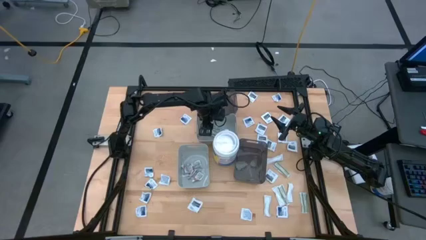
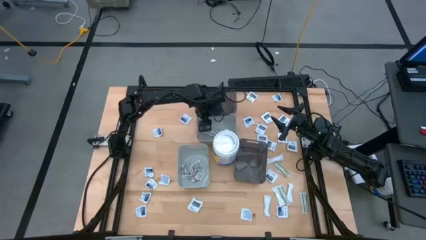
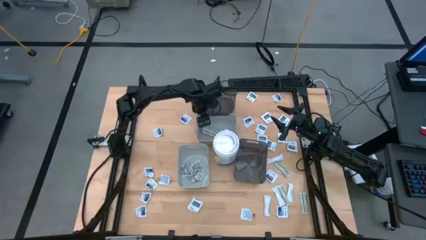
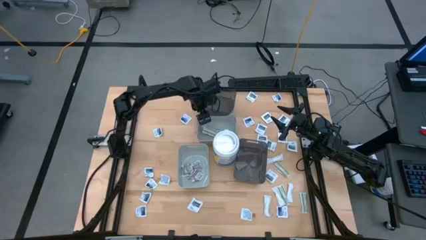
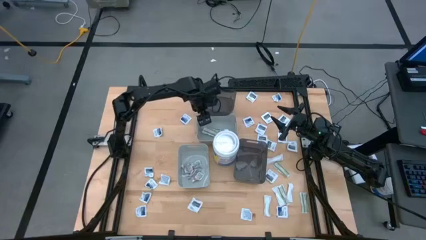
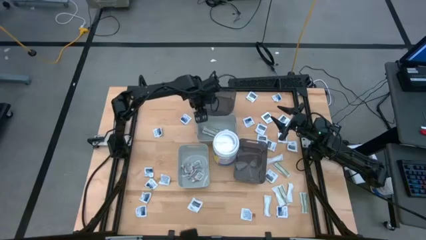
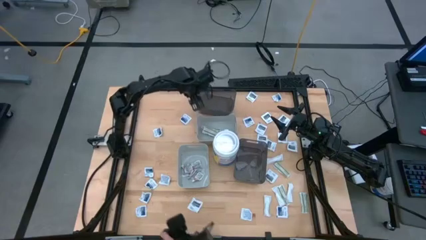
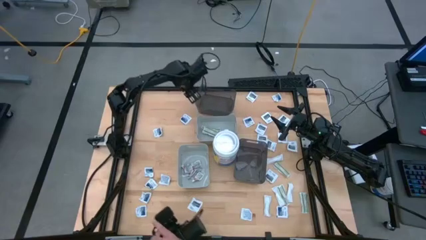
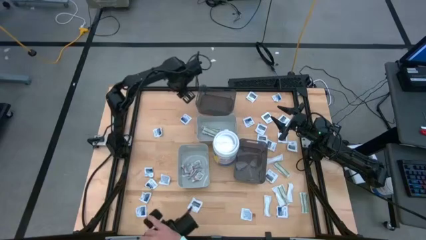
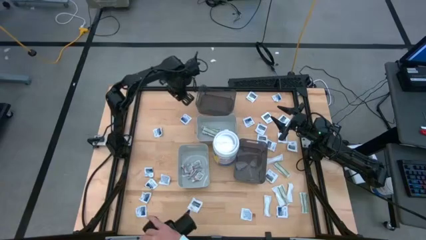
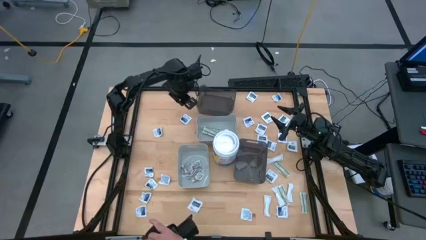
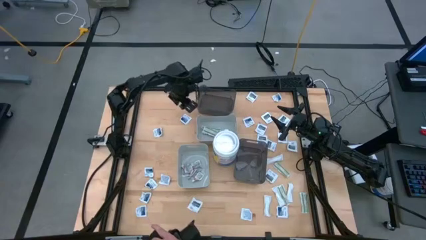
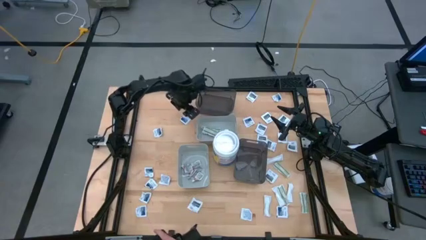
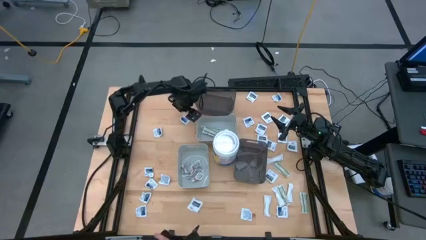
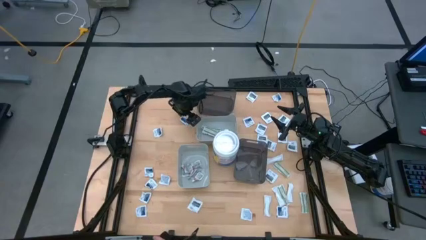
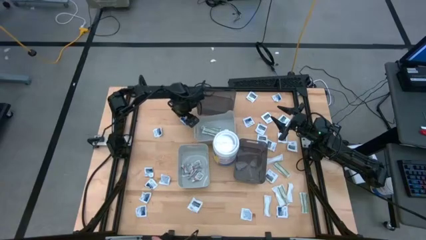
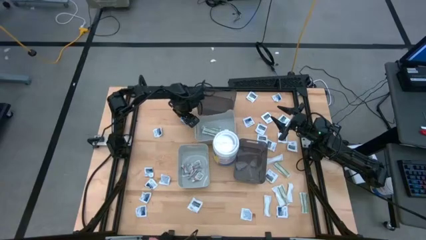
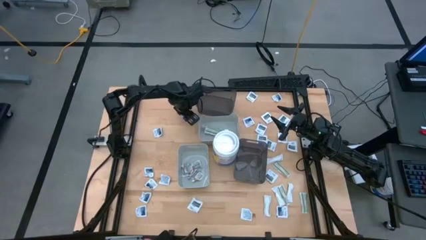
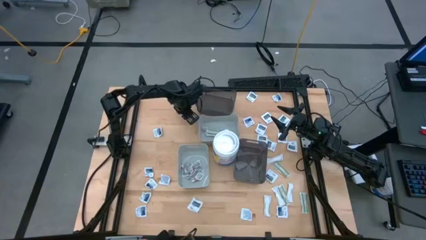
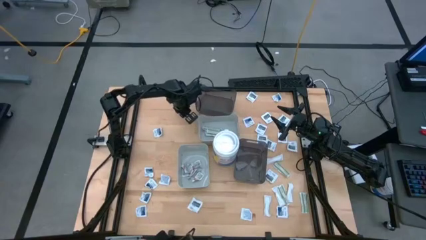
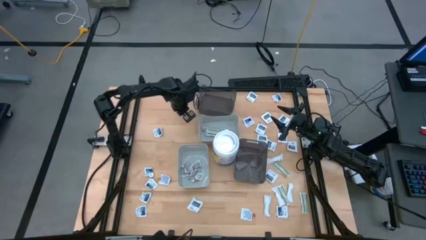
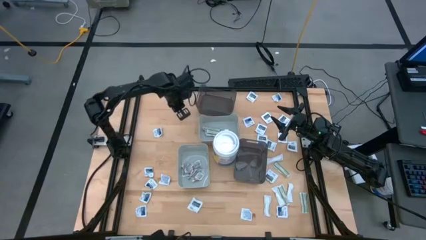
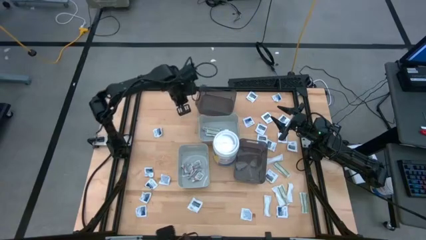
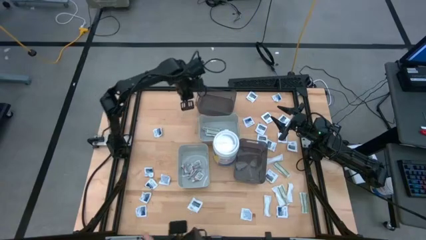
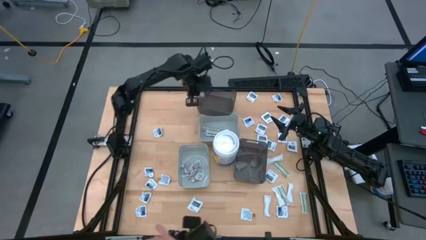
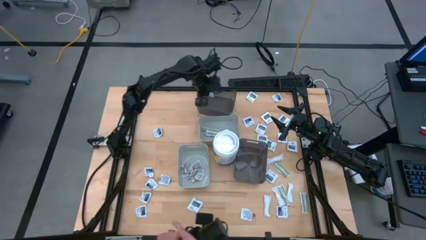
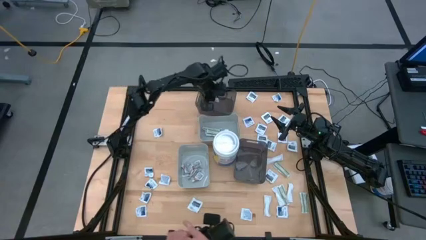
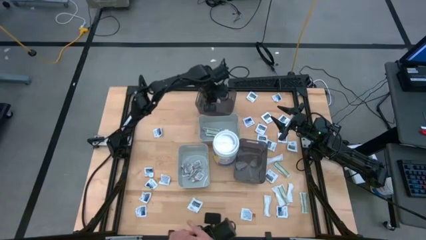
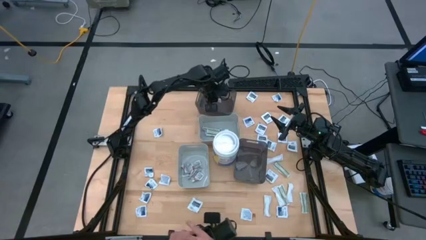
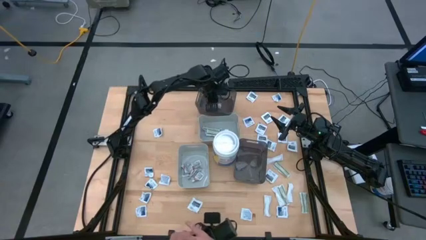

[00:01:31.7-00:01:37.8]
Task: Pick & Place First Aid Supplies
Put the alcohol pad into the top transparent black bin

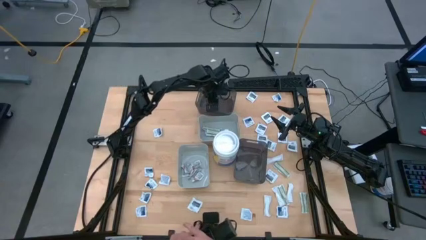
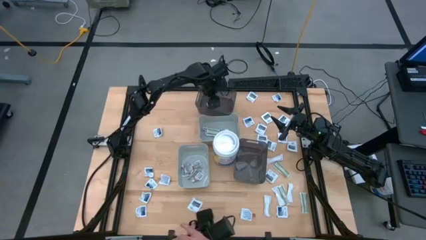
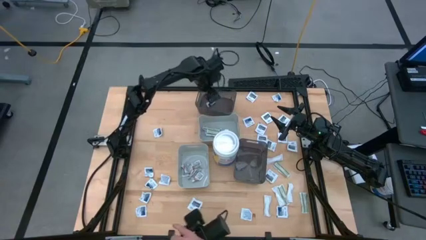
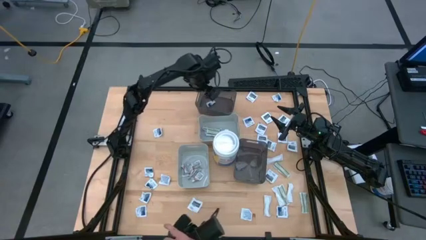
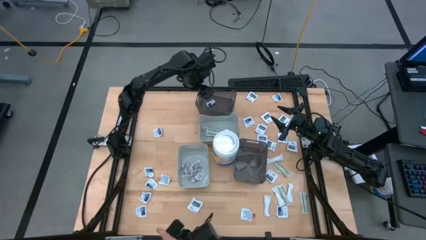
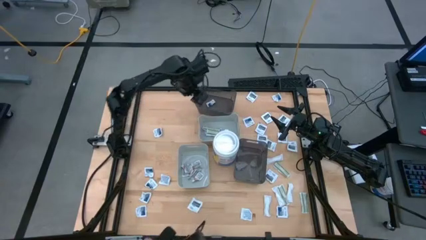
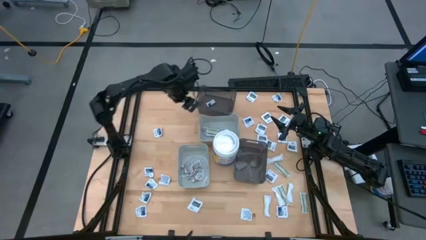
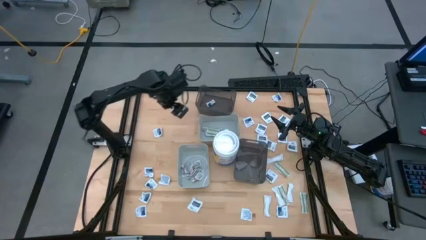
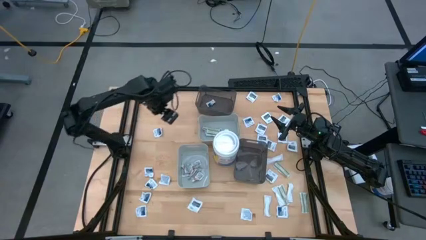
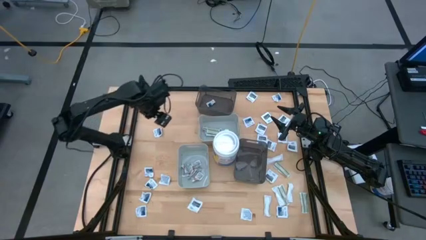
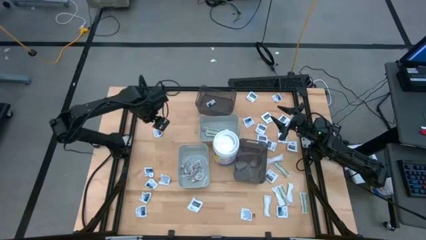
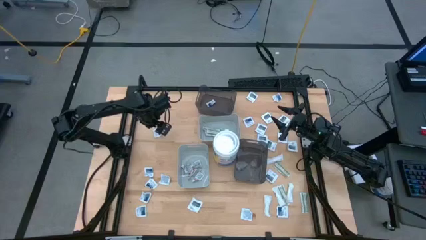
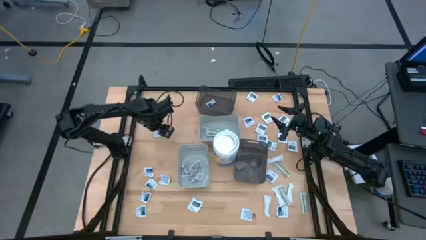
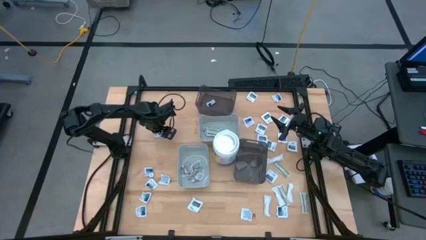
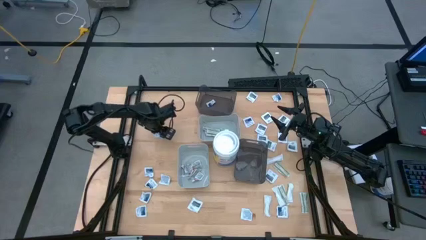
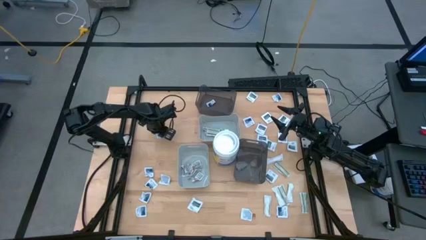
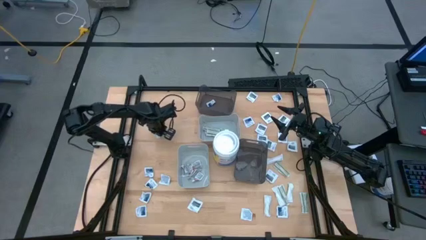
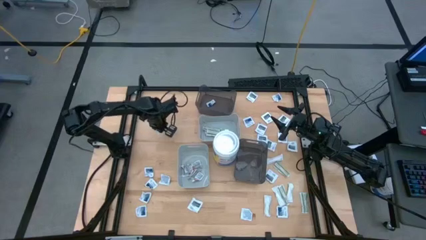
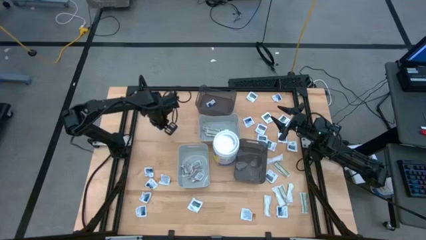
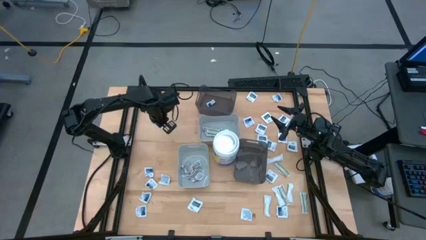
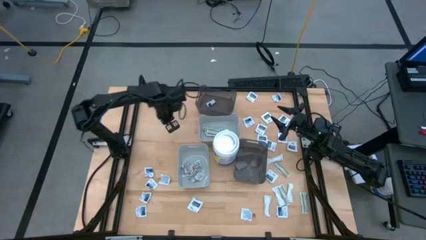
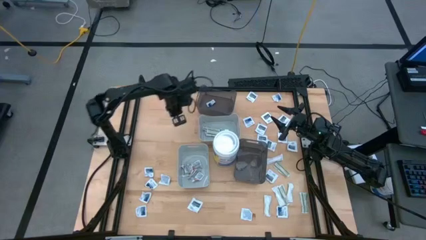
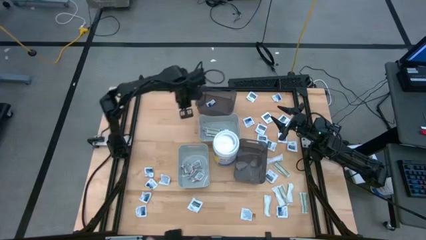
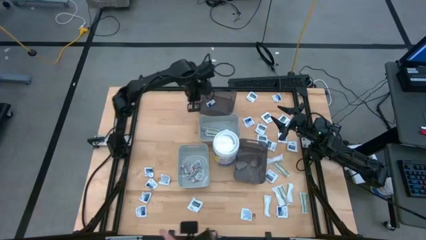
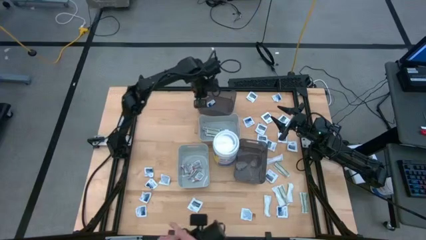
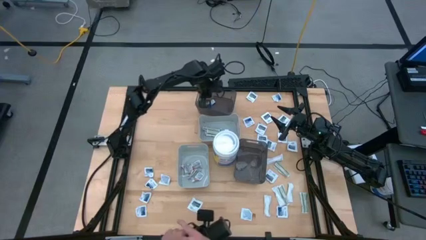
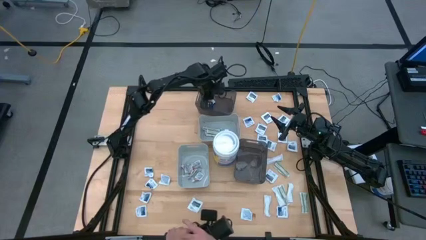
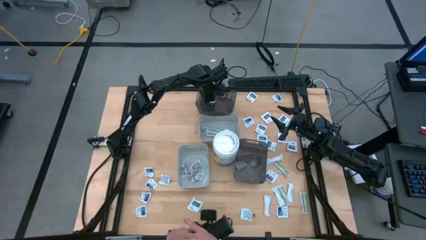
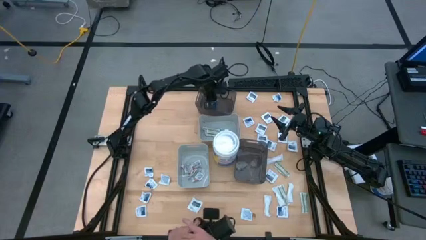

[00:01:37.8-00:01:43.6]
Put the alcohol pad into the top transparent black bin

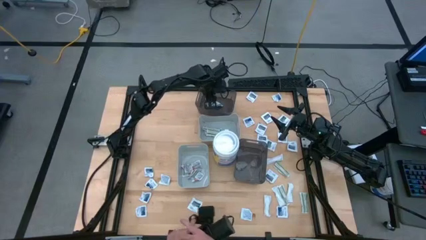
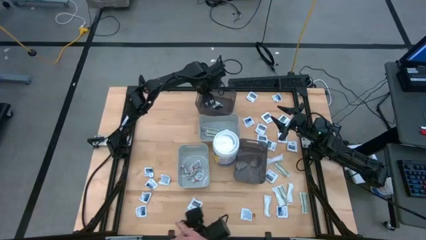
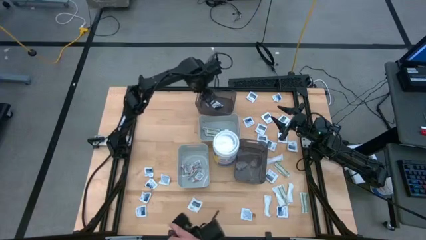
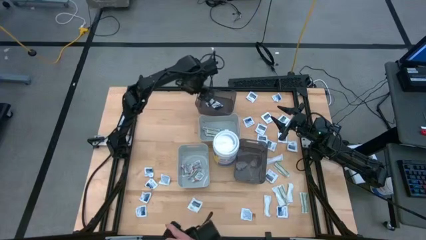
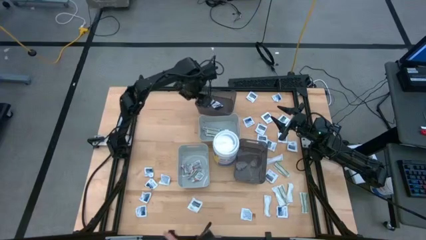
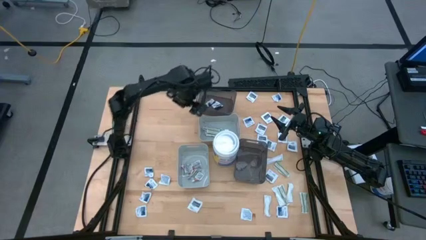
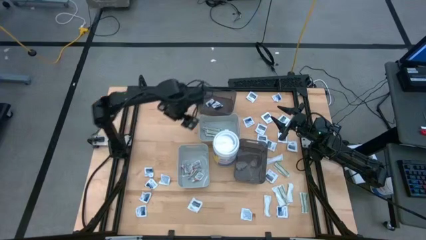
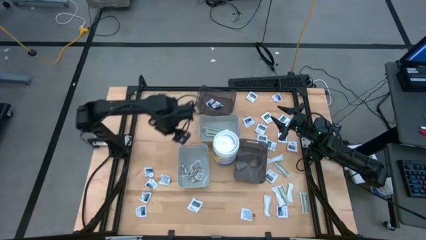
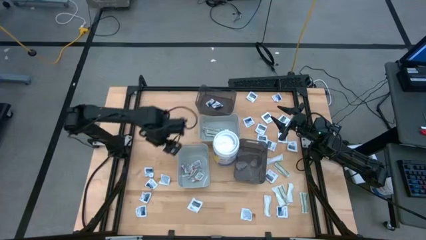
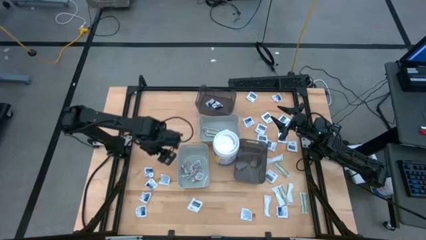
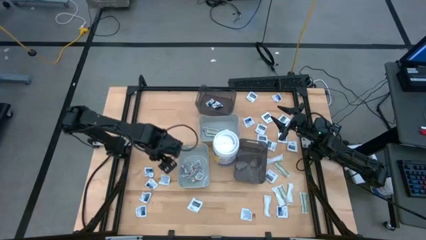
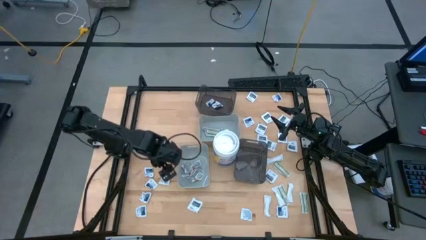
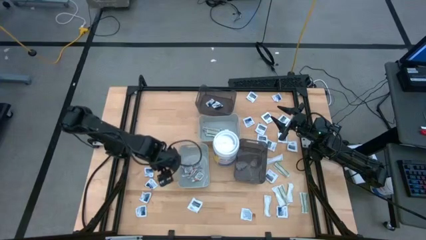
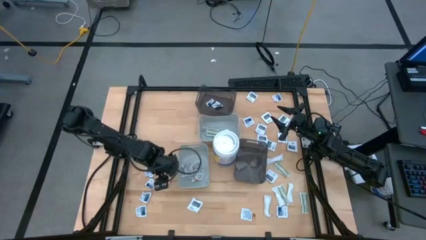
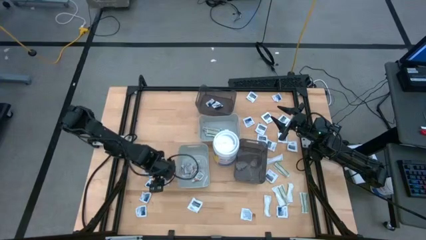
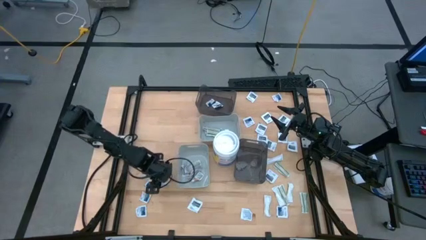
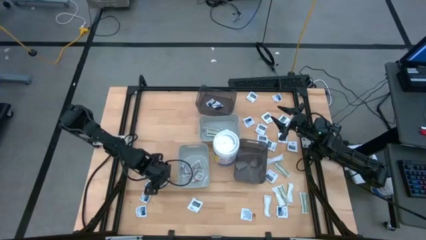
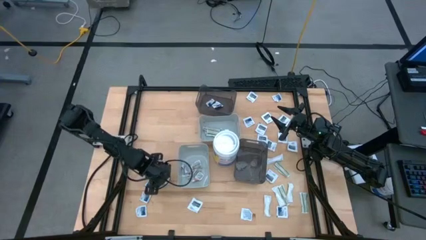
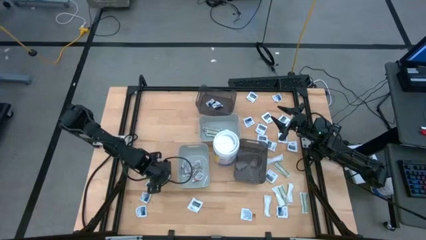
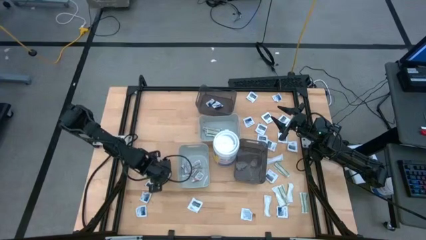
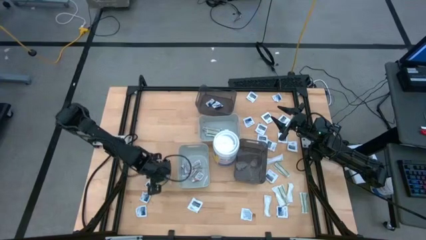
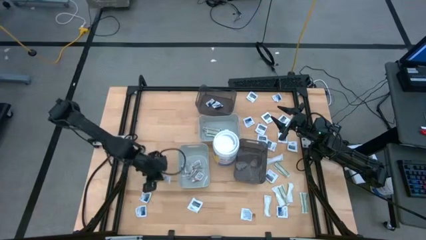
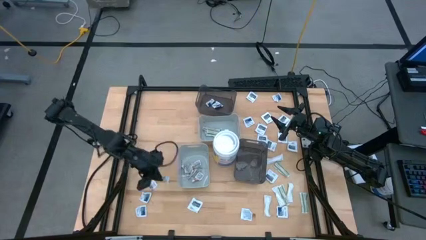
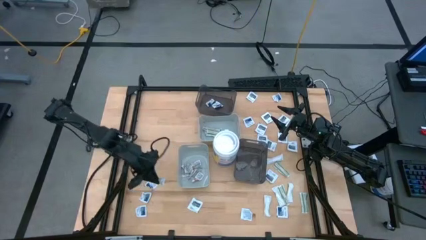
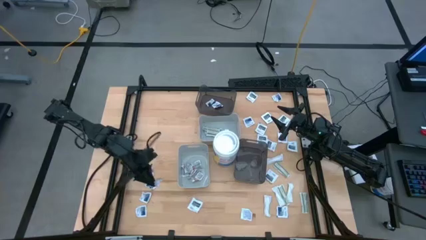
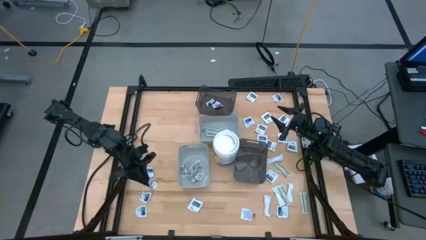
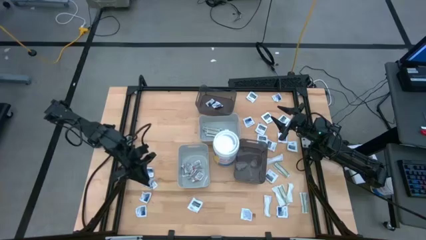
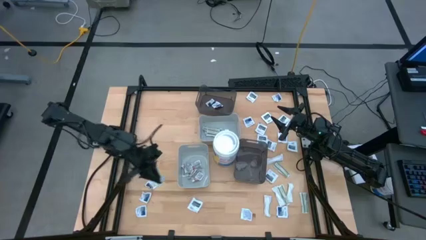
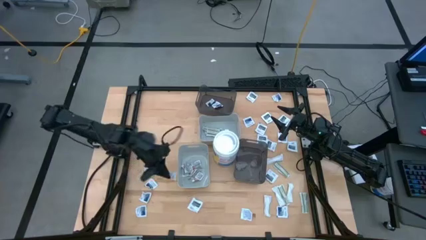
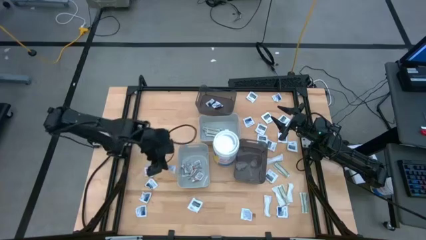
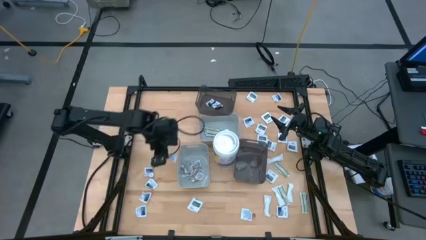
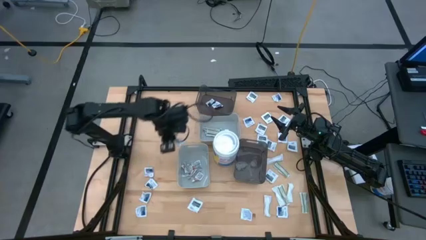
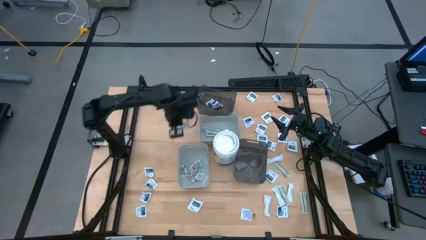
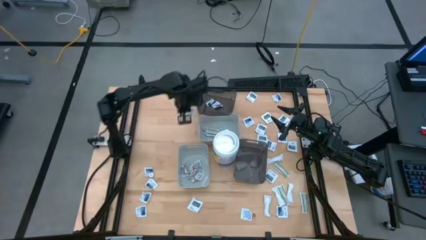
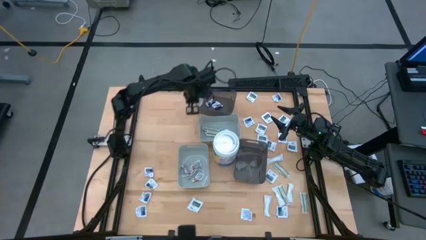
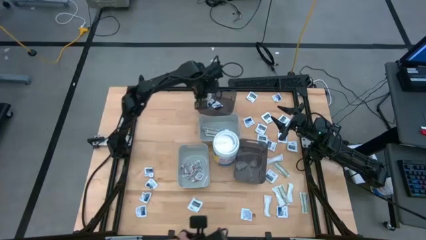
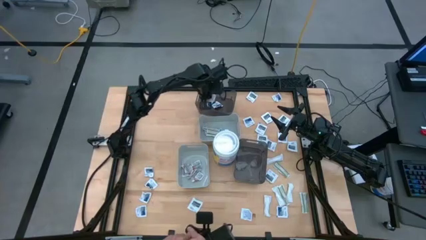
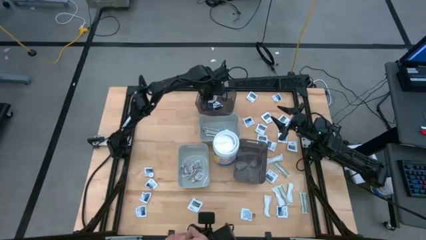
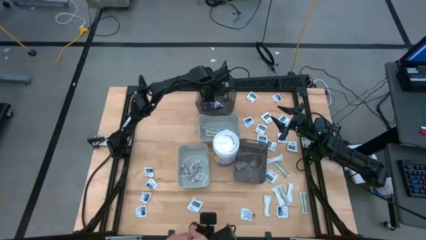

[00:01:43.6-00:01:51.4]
Put the alcohol pad into the top transparent black bin
